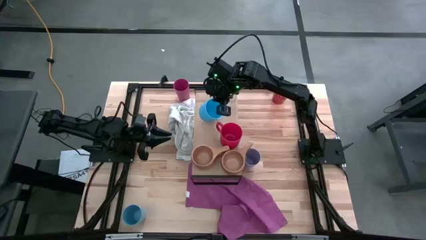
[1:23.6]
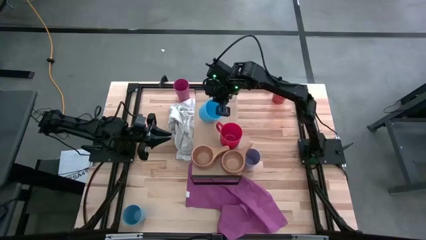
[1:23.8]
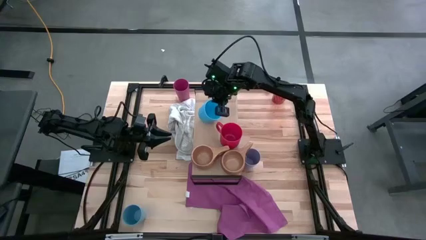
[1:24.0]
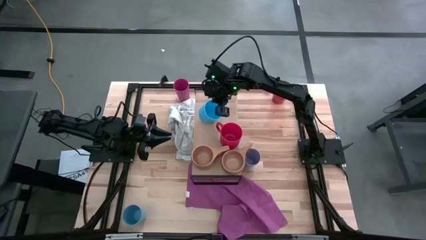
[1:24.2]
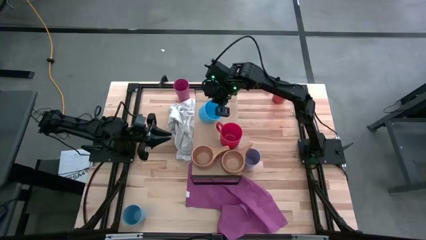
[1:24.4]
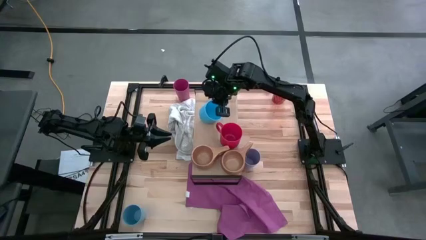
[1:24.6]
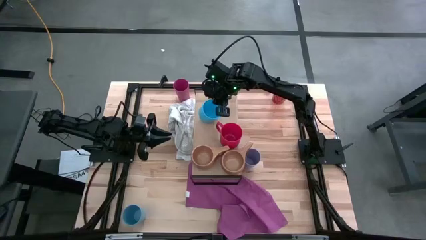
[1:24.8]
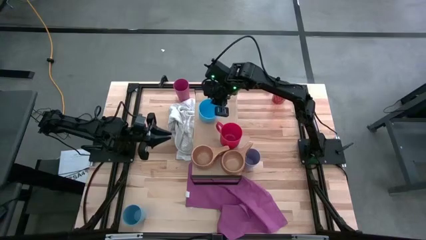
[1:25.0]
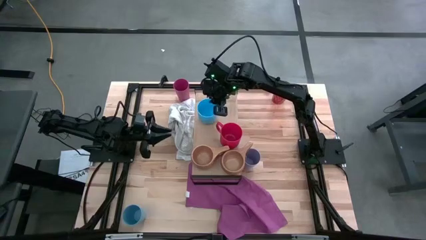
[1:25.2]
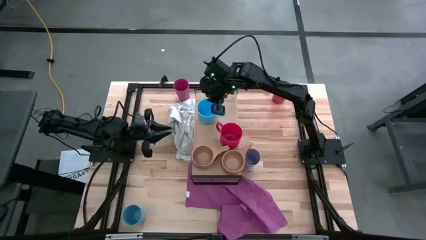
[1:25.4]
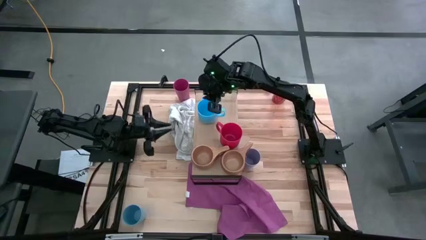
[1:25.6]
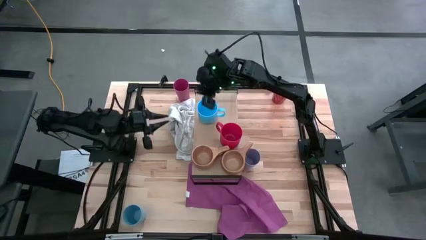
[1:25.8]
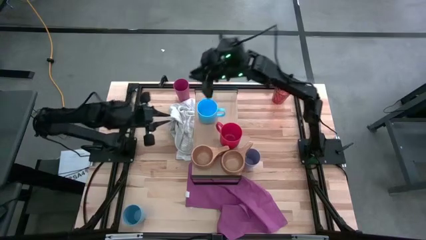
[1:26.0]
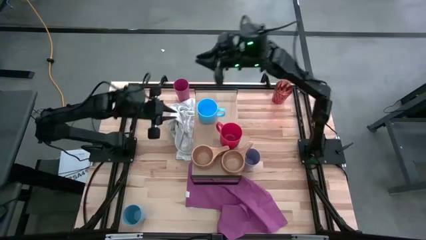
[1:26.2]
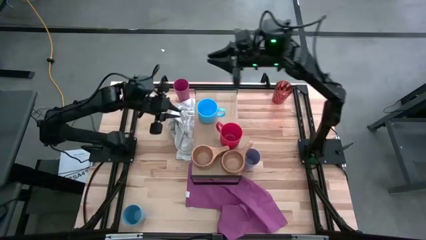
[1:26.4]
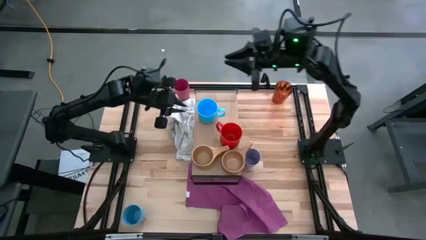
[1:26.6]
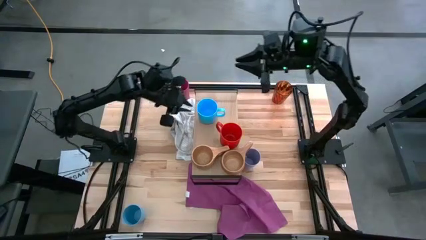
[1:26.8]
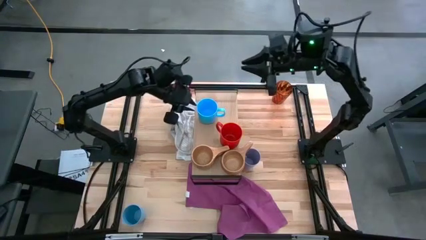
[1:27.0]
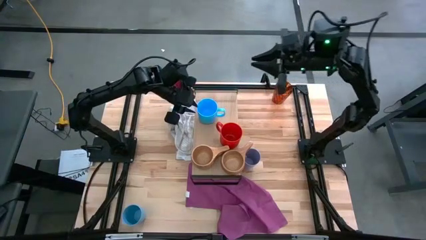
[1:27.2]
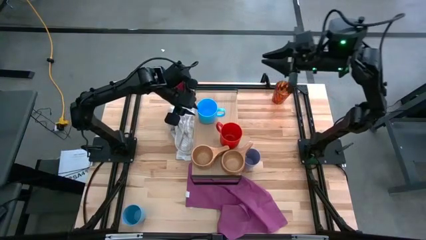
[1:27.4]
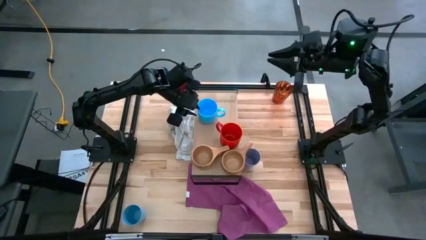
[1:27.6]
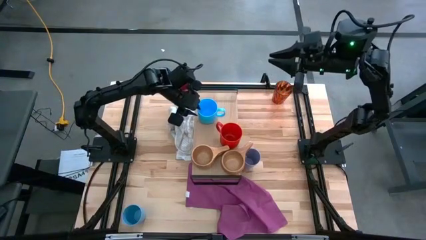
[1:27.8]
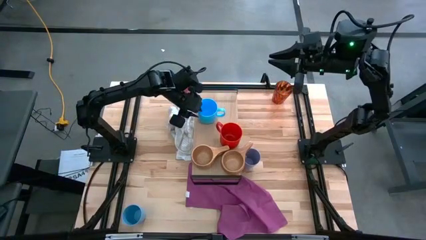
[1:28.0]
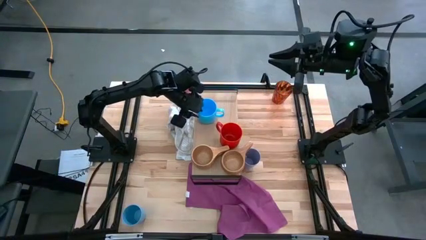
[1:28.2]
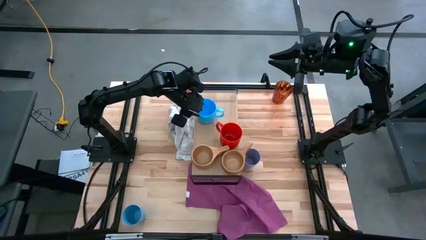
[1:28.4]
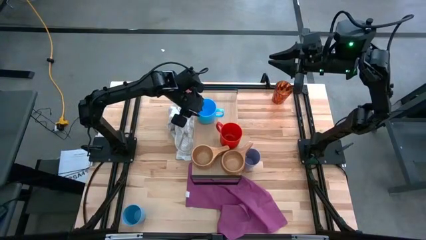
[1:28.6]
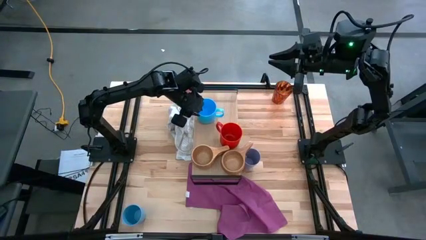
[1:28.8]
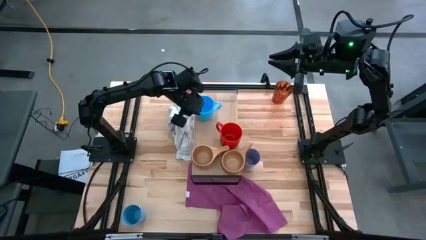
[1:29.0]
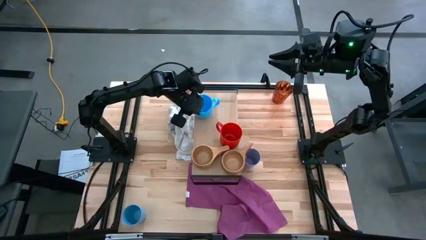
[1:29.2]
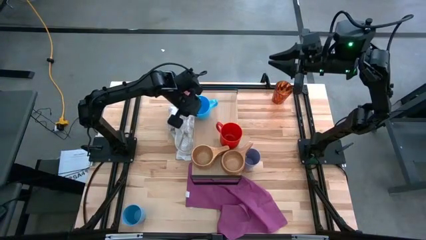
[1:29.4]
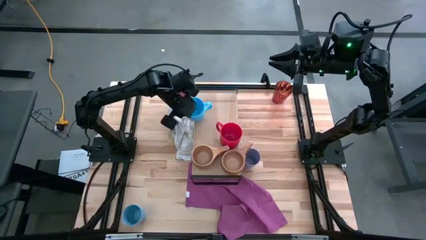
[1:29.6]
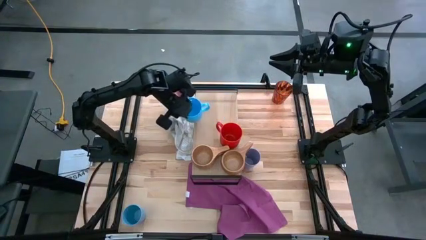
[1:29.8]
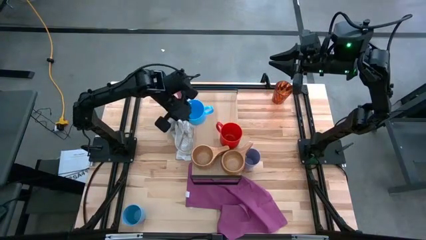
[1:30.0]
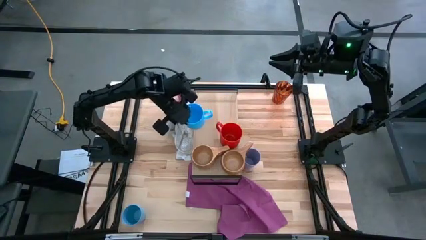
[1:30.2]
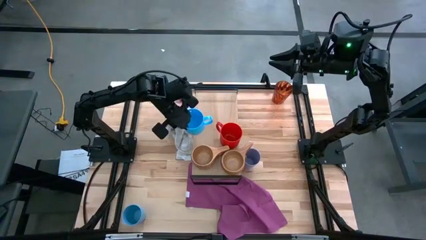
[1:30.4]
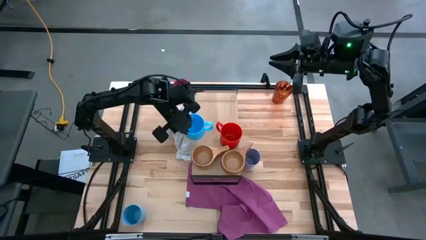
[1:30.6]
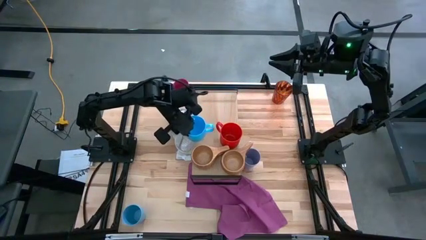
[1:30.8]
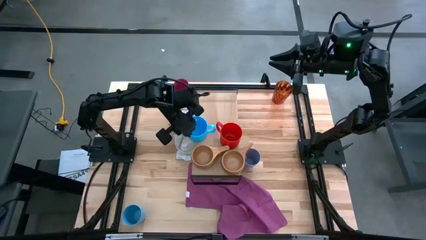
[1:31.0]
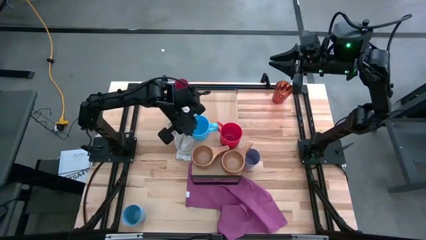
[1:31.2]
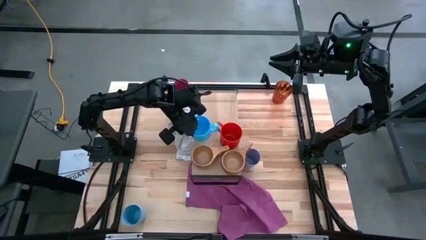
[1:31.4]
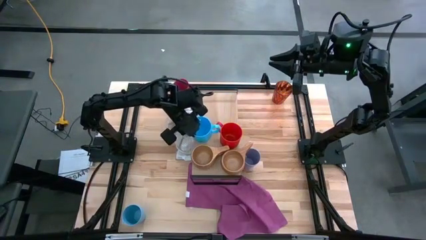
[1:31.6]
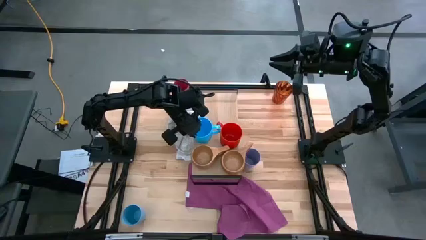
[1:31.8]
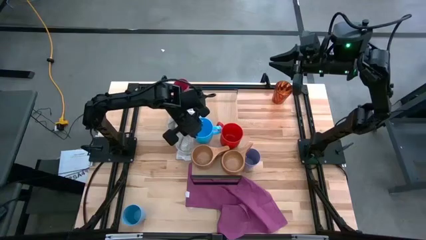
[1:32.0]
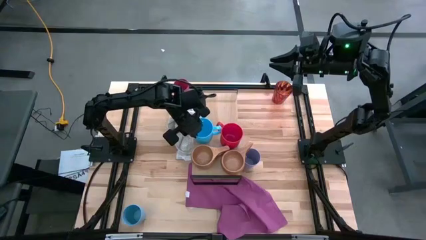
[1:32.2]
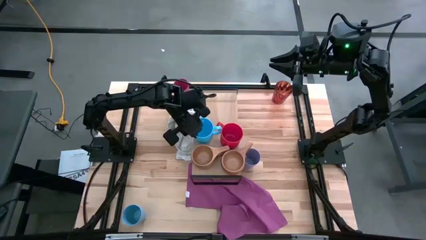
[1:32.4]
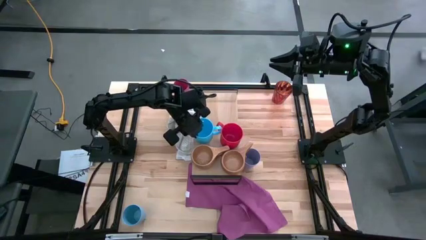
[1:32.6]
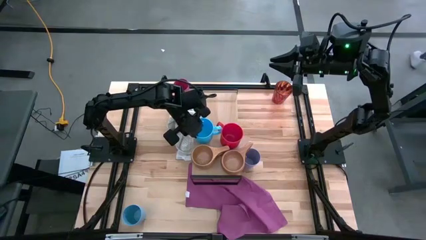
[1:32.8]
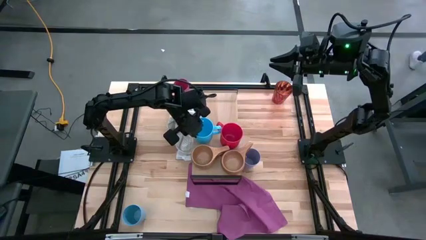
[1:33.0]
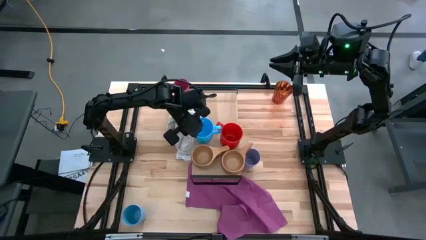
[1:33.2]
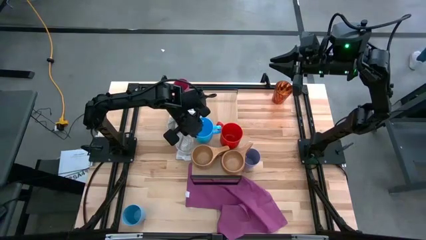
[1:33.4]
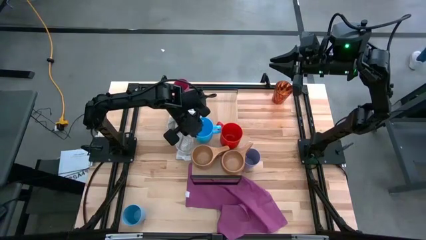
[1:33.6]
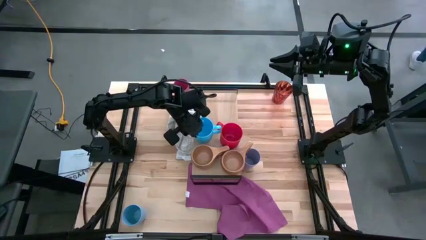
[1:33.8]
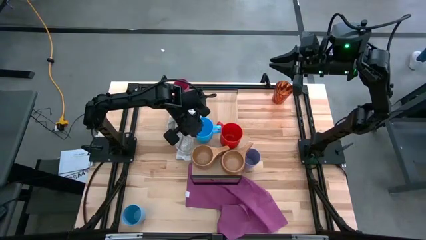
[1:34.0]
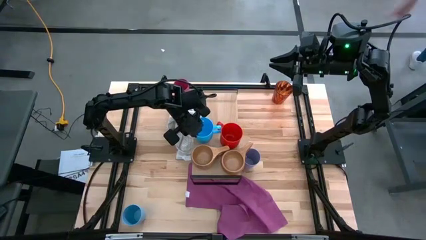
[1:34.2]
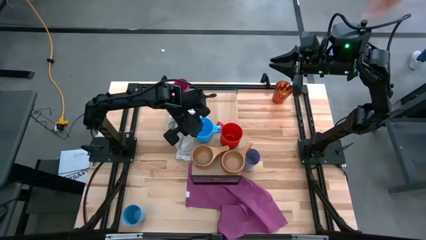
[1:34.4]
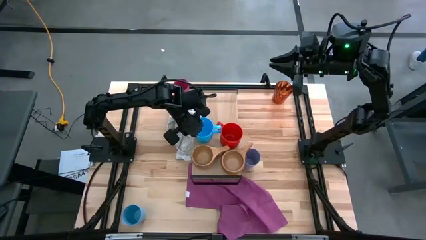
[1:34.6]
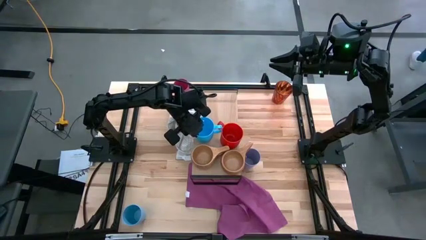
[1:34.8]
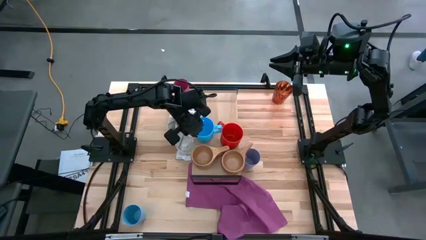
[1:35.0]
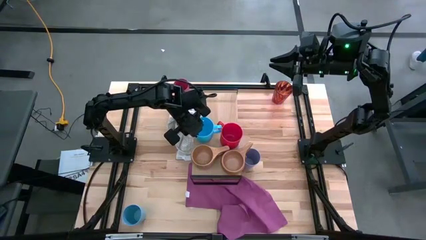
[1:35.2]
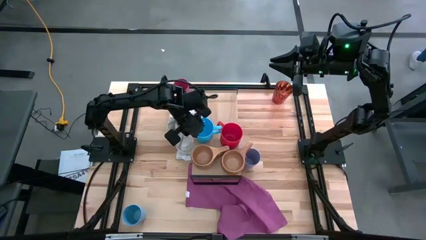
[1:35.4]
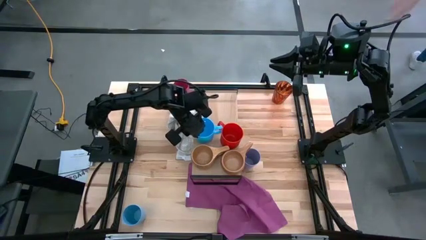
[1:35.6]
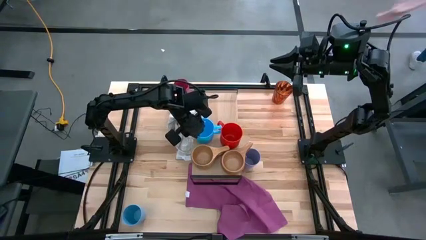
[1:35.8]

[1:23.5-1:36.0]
Task: Stack small to large cups/mugs on shelf
Put the blue mug on the shelf
